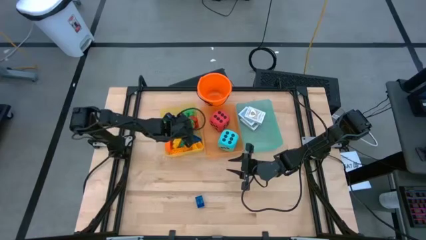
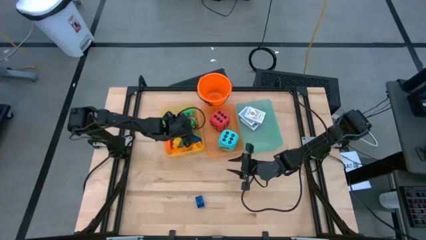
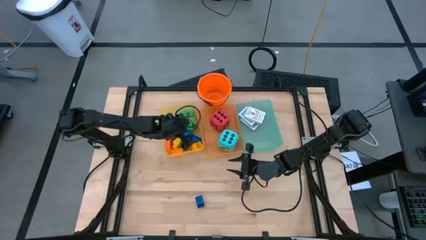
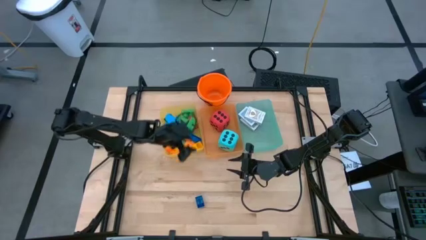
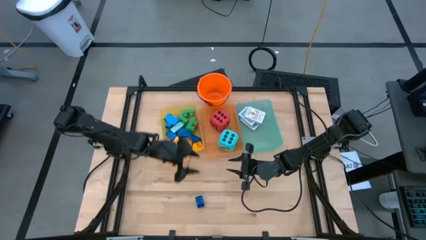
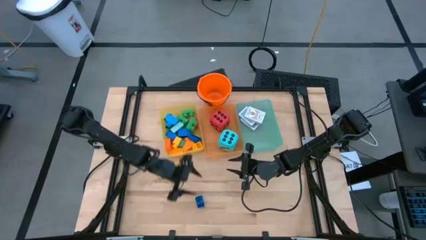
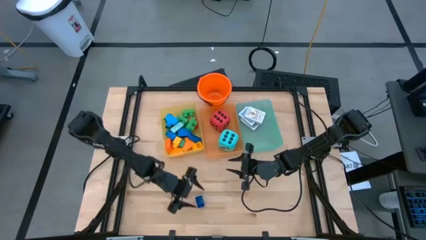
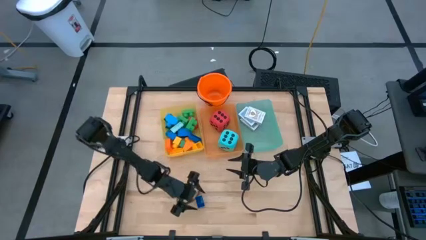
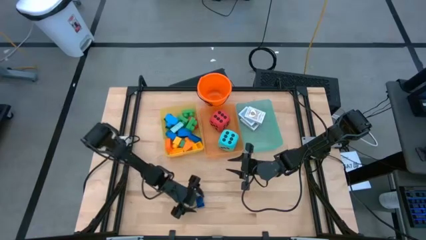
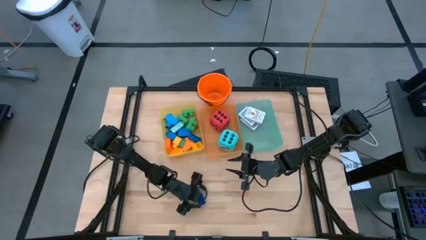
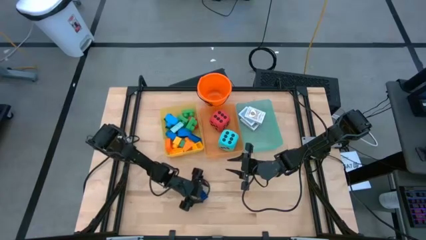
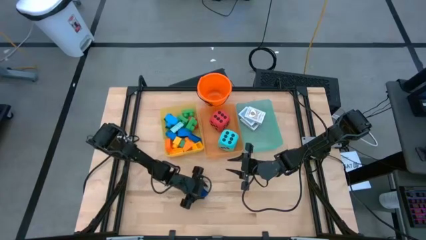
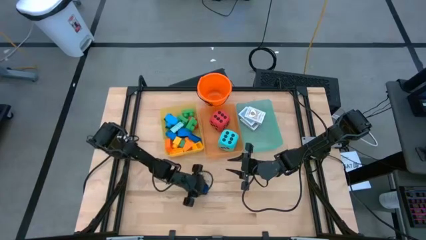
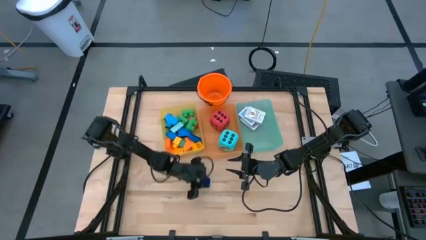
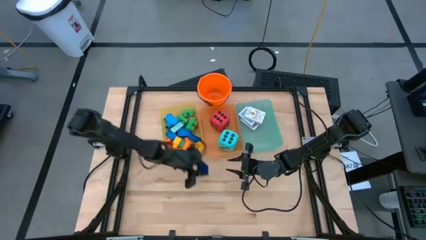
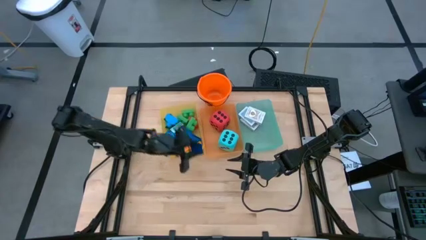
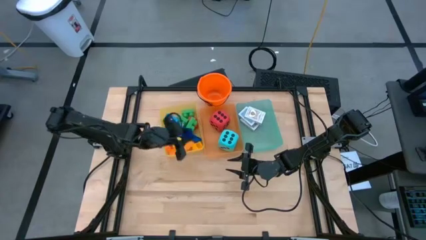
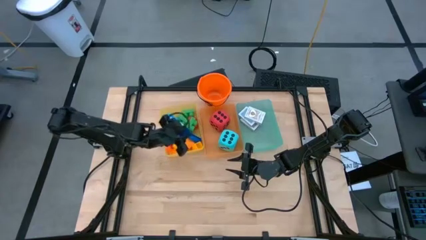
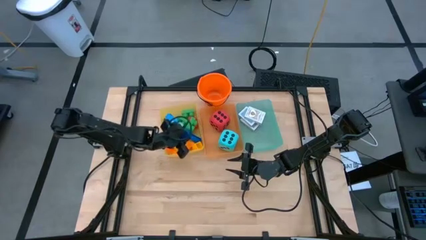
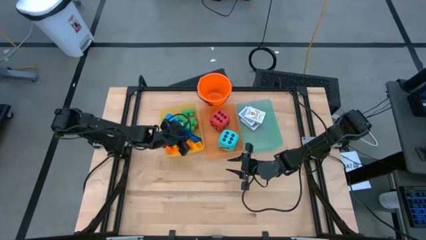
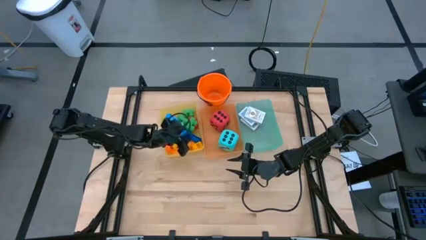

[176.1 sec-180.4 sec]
Task: Pick & Place Toys
Put the dark blue game piece into the yellow bin

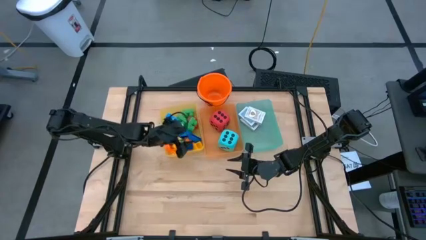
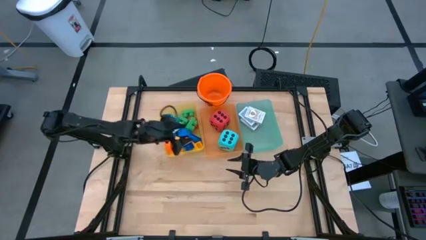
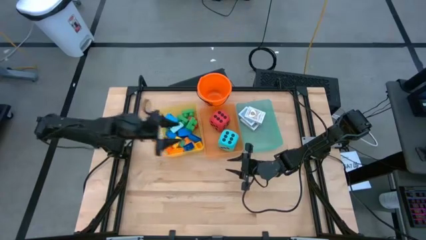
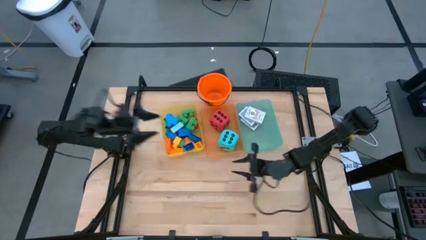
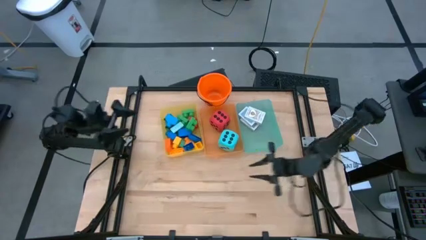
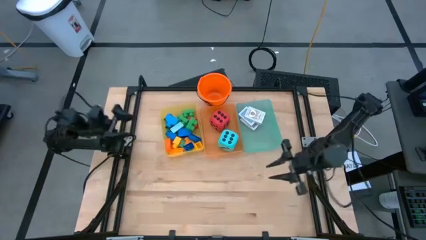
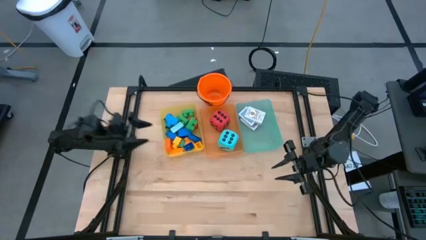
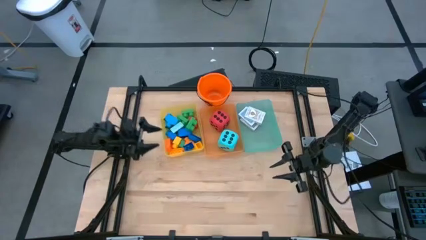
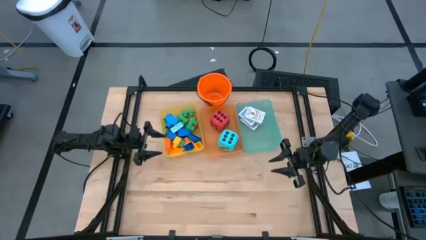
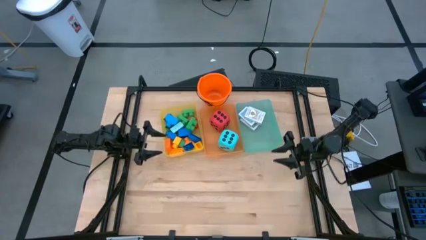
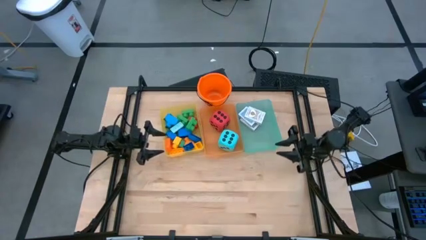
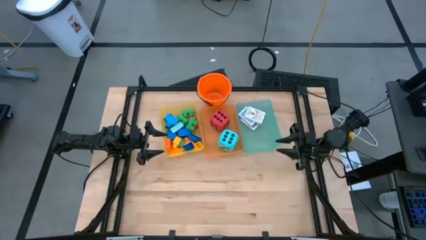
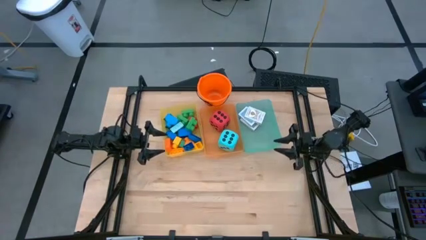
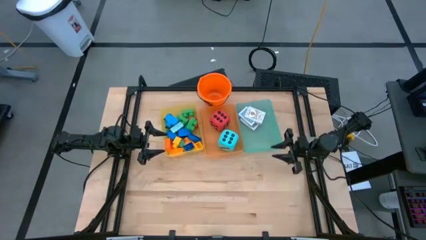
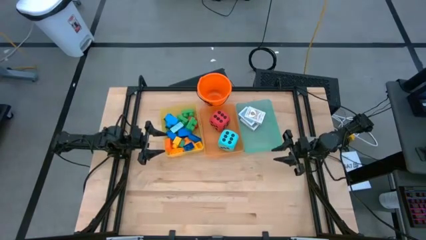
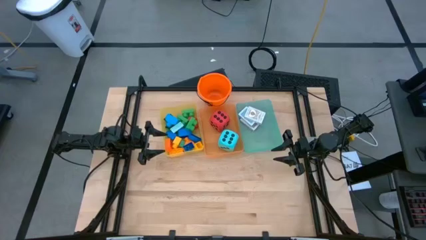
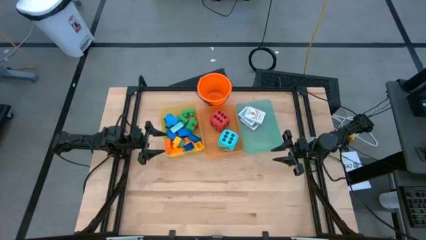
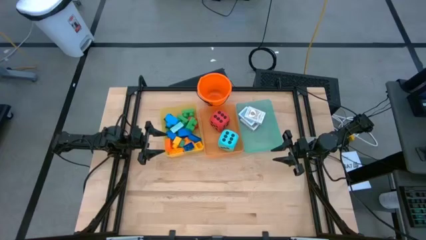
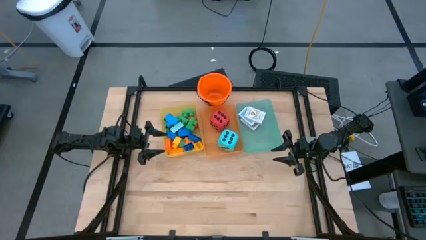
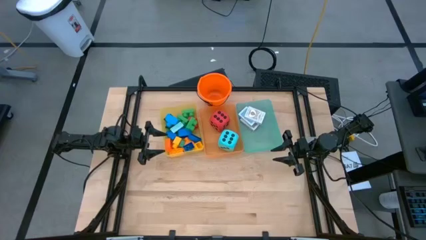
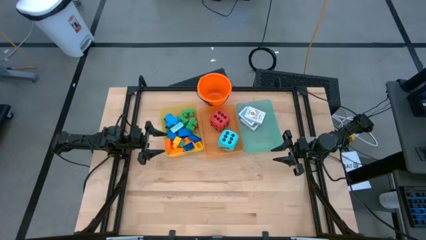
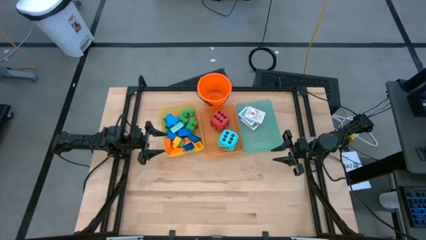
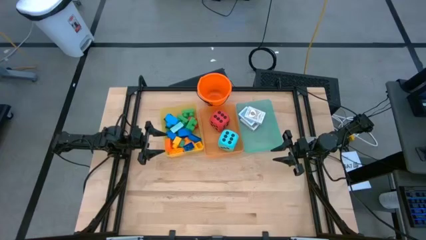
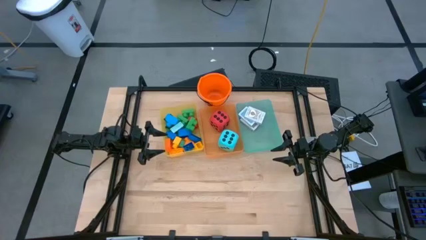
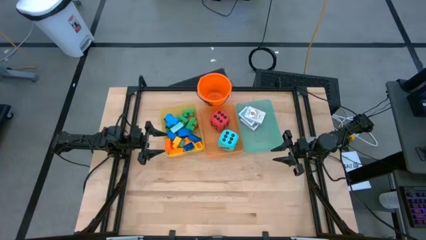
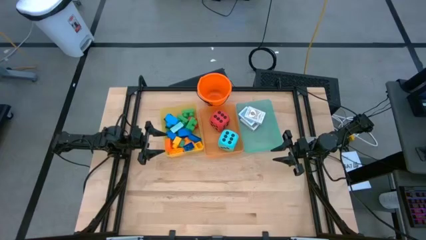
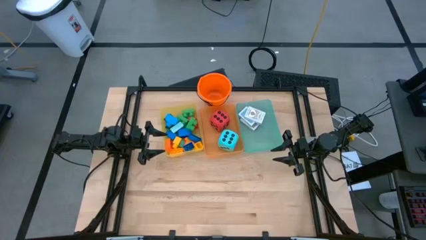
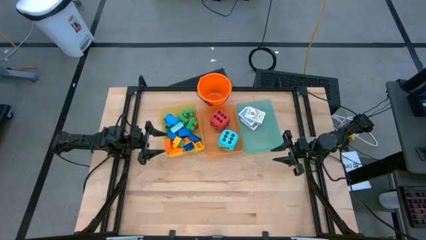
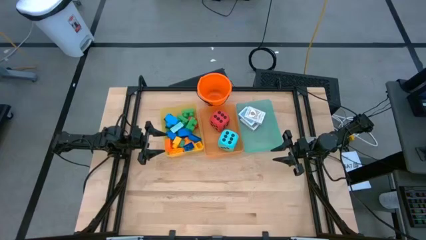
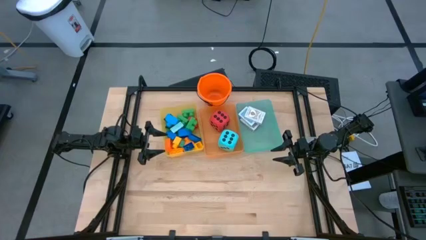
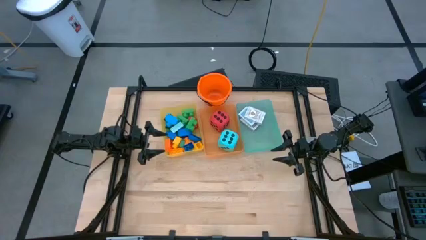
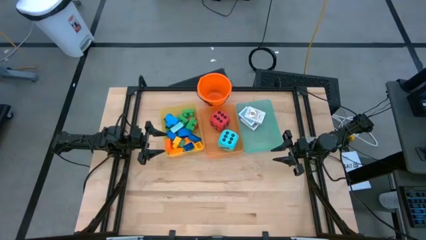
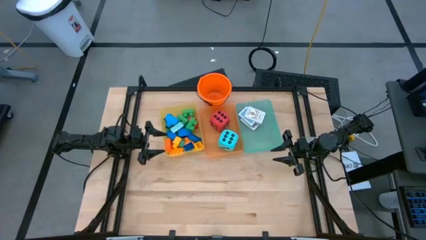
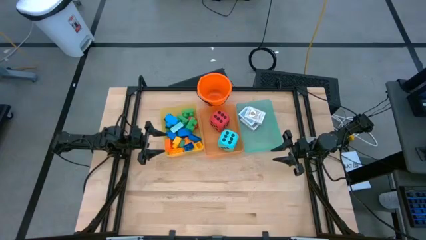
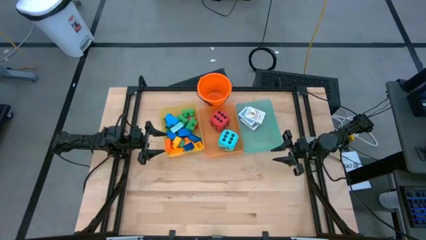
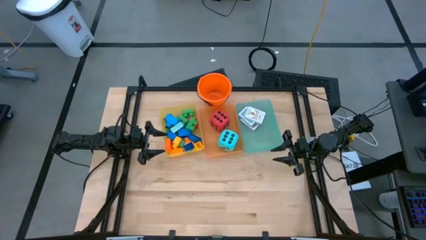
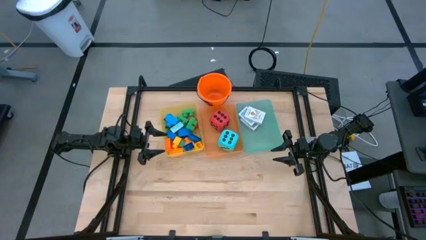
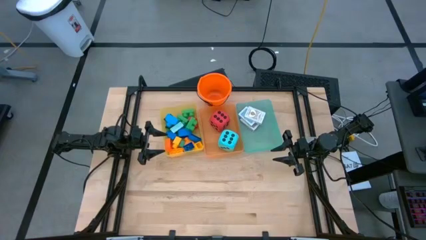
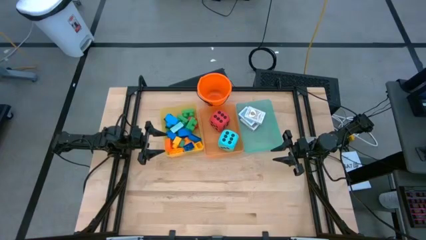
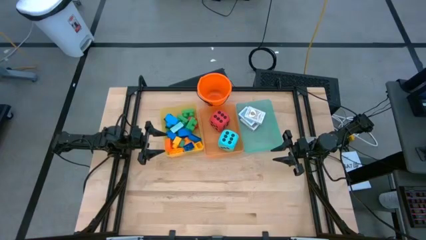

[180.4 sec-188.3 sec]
Return to Home Position

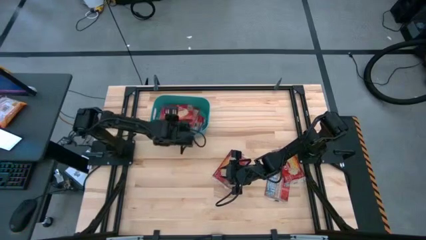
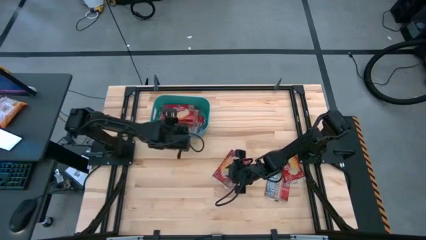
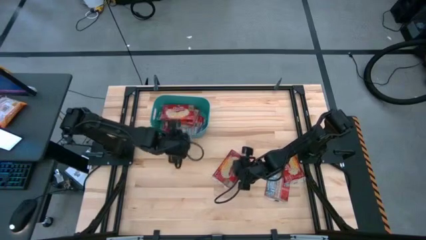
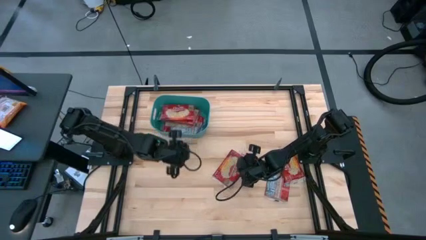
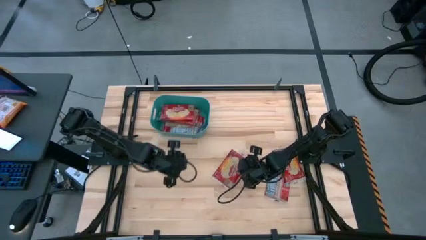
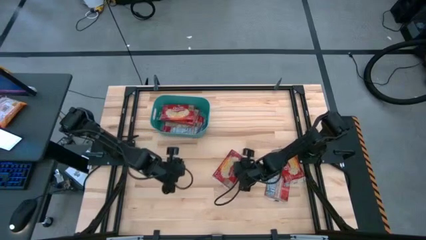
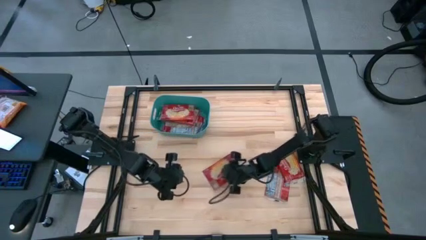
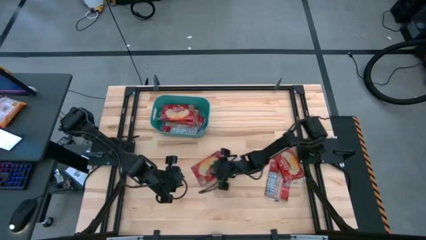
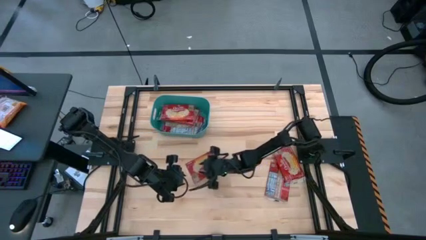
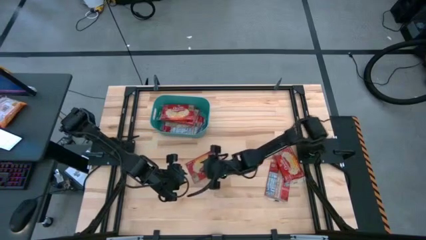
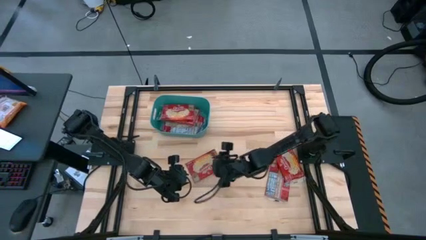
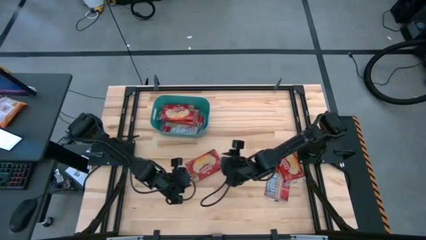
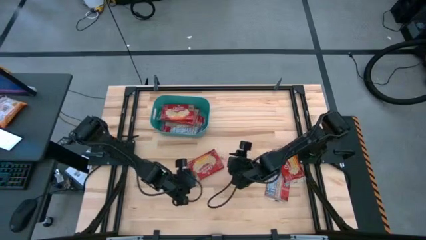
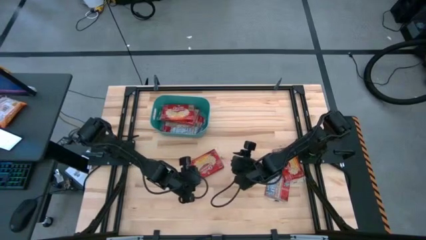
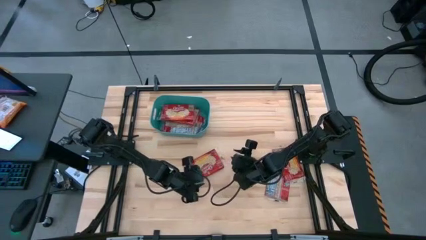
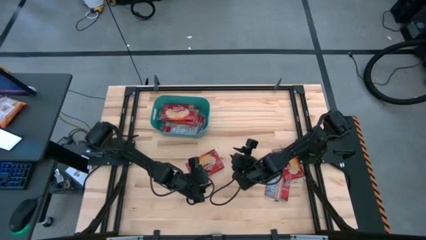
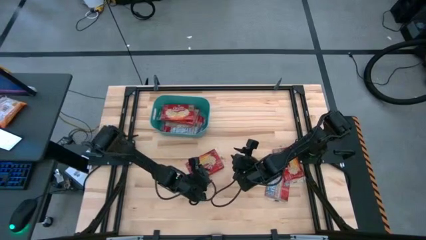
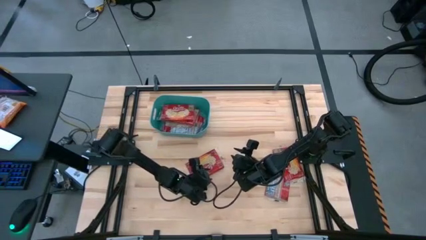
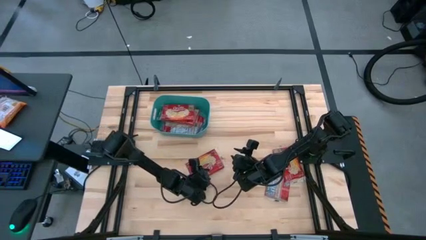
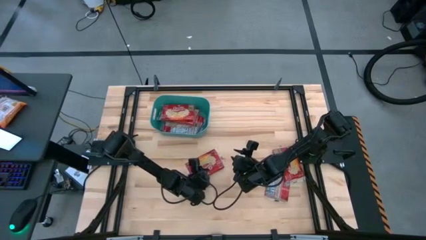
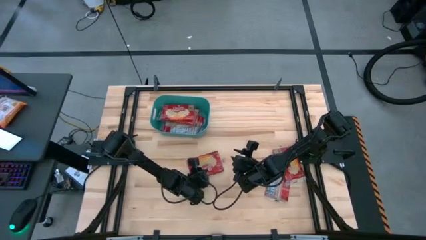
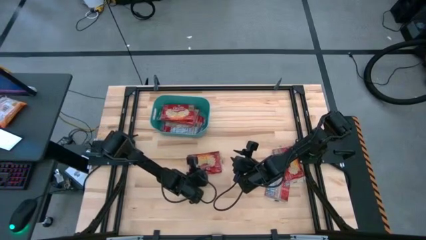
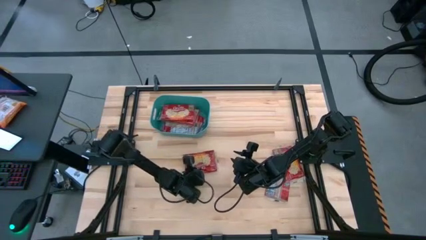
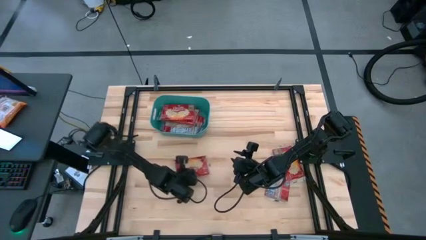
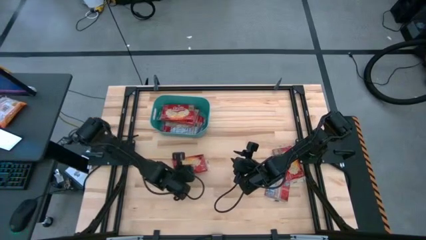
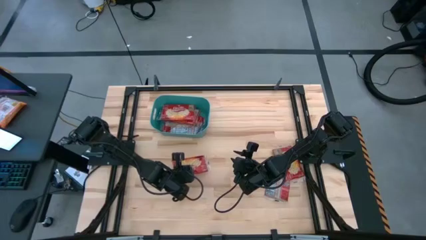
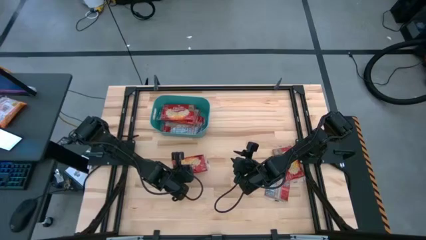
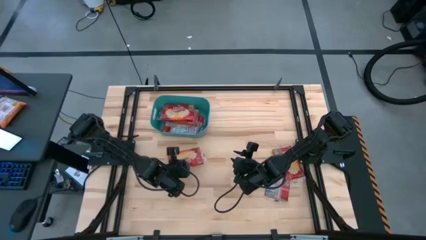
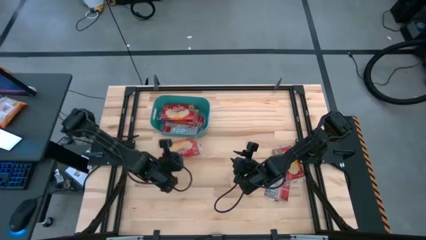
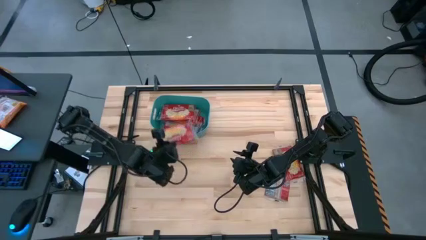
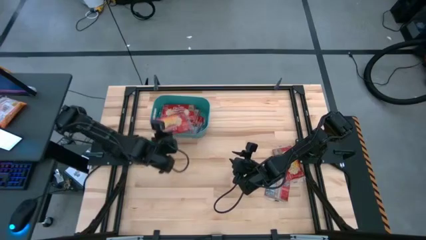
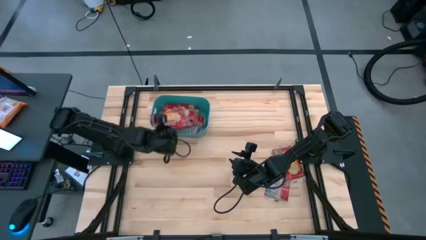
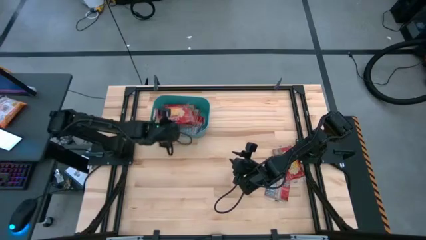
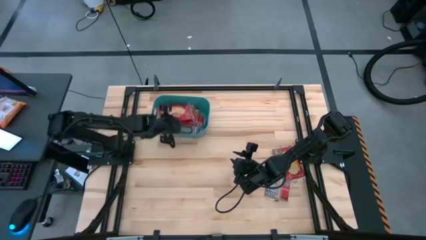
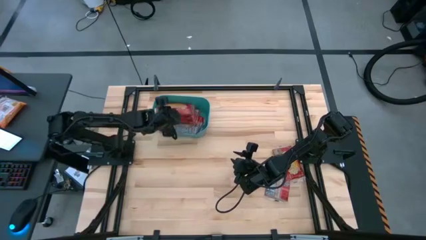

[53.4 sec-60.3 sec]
Task: Sort popcorn bags into baskets
Put the red popcorn pack into the green bin
